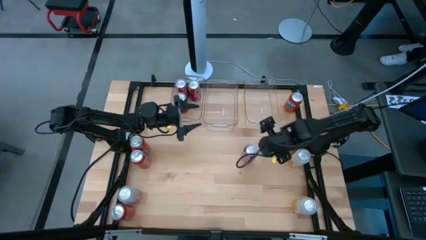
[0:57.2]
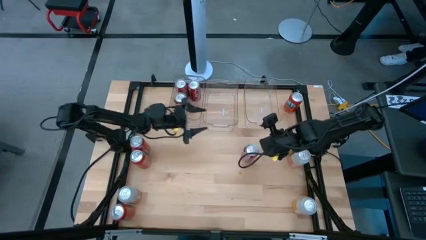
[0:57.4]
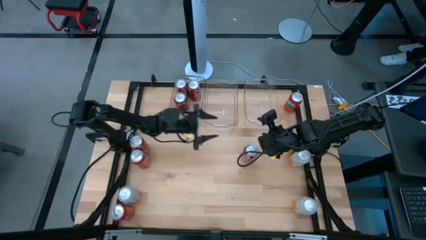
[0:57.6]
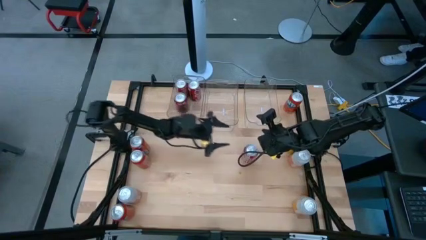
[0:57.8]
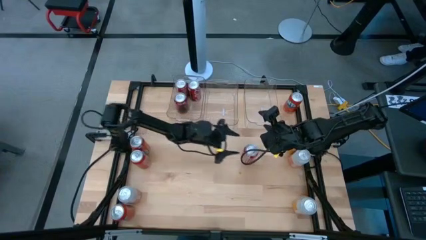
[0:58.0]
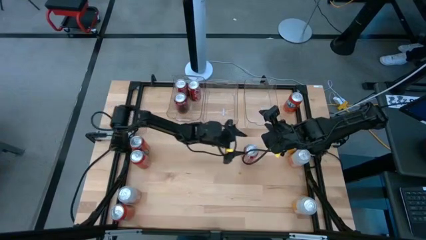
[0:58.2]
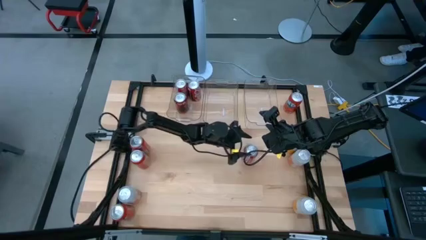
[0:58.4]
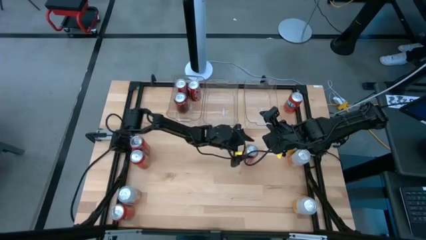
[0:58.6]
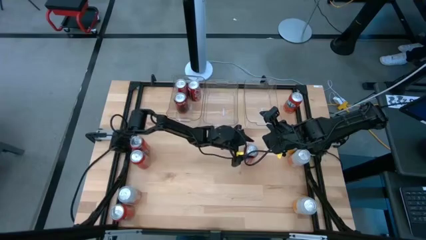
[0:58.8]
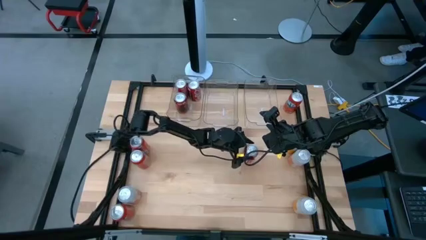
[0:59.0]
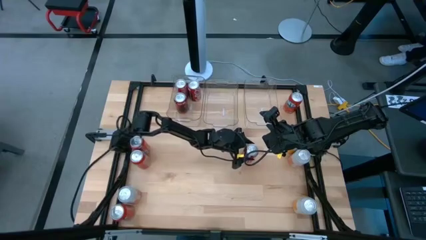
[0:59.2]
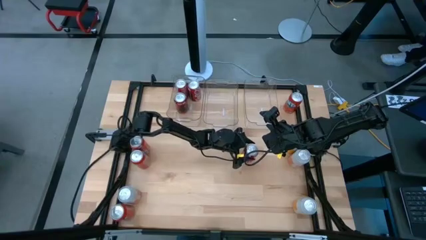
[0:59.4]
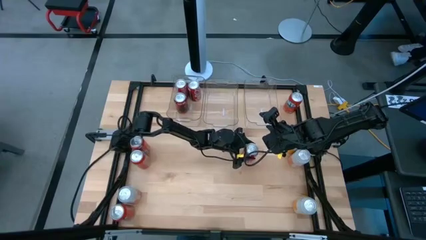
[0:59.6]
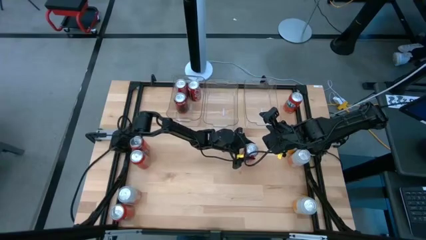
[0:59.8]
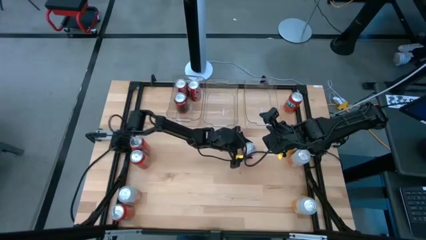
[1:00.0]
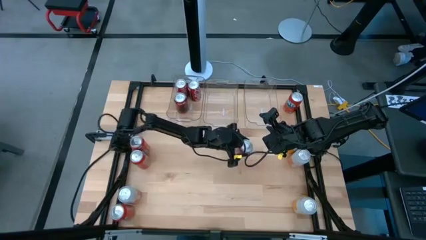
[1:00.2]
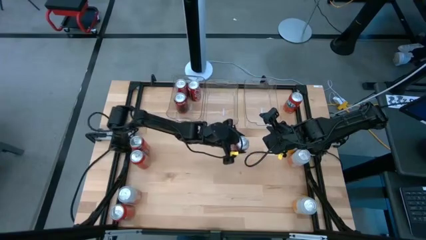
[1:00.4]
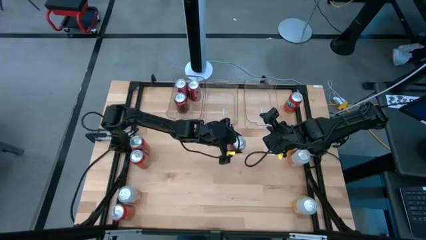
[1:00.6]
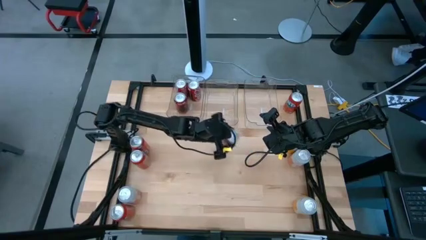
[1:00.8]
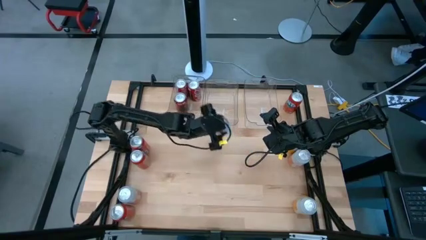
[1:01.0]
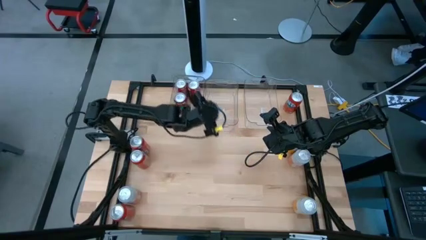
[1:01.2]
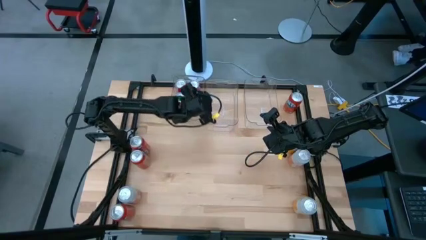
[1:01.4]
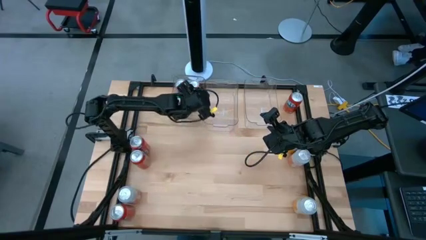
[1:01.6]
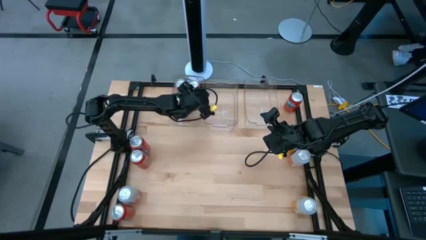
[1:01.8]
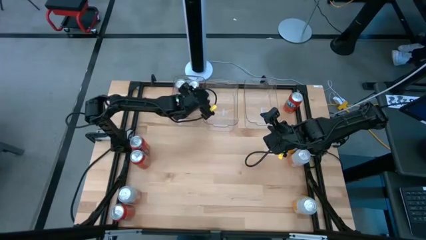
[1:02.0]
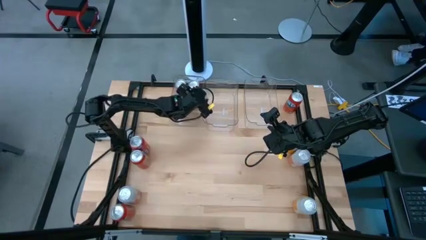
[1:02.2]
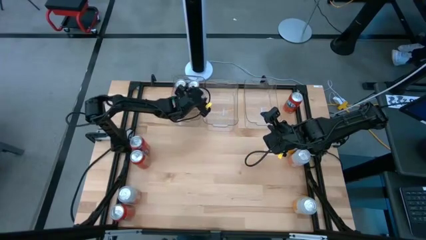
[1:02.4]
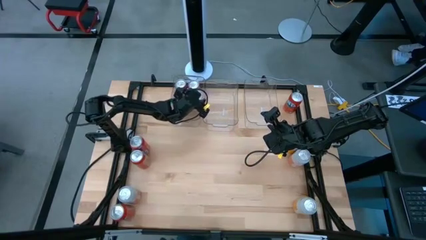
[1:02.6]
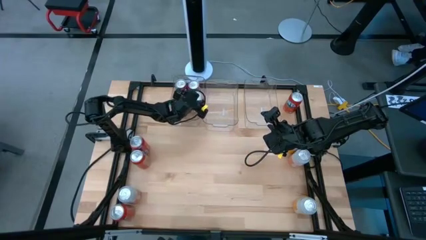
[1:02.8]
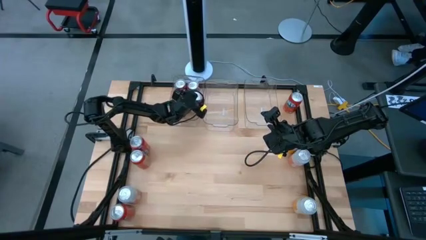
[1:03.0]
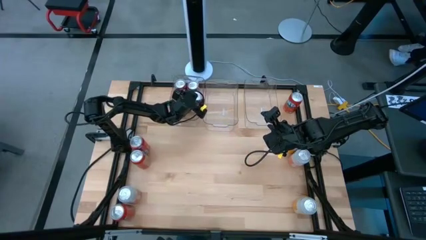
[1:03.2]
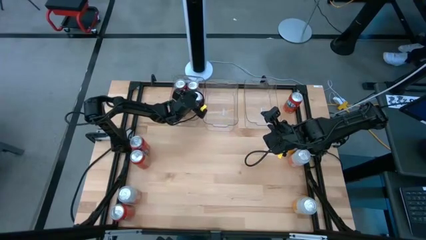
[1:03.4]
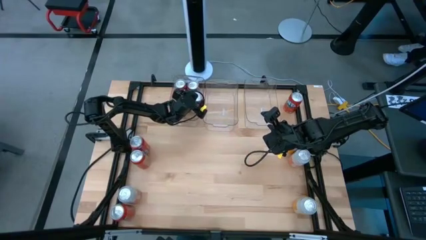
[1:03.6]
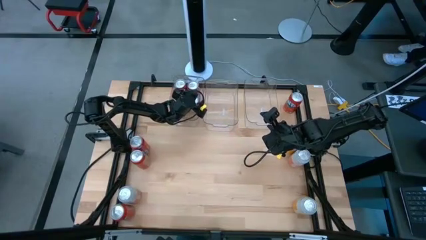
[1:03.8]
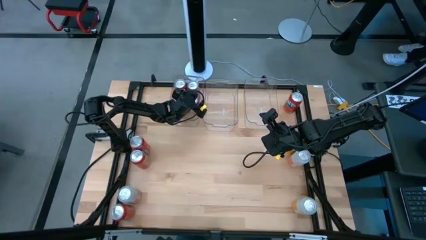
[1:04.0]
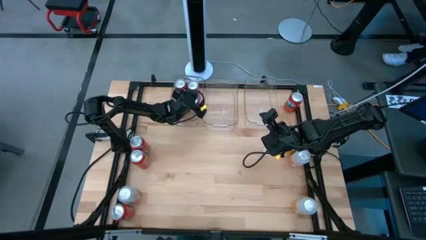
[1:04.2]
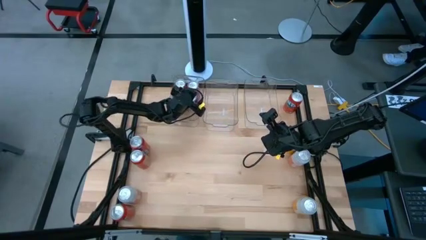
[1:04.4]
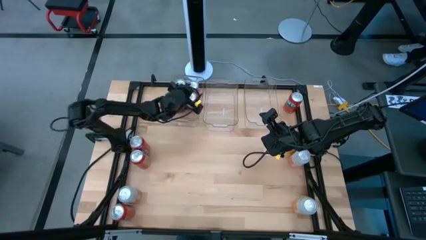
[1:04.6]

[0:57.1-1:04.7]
Task: Sort soda cans
Put the center red soda can into the left transparent bin

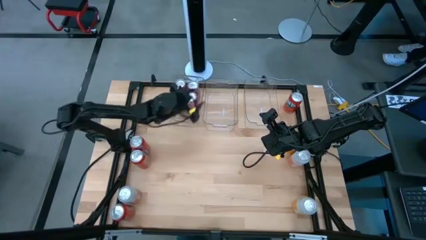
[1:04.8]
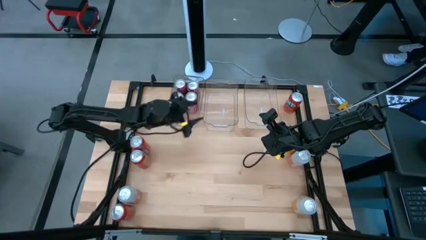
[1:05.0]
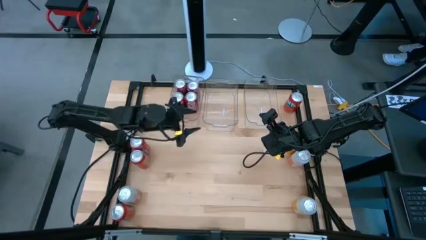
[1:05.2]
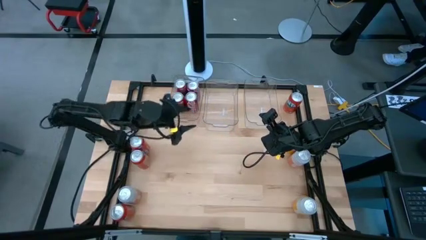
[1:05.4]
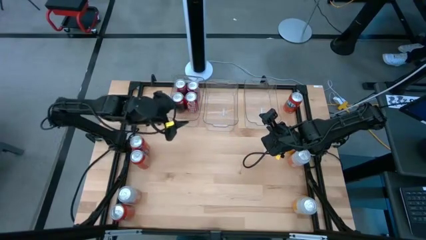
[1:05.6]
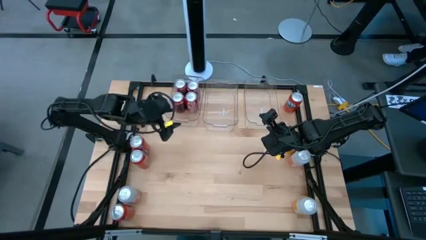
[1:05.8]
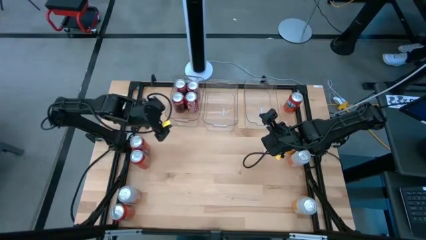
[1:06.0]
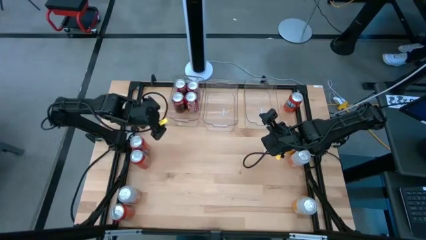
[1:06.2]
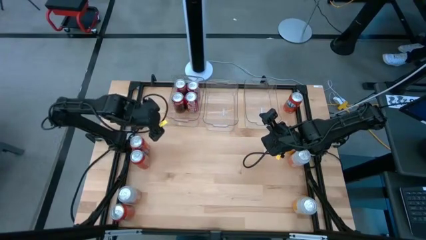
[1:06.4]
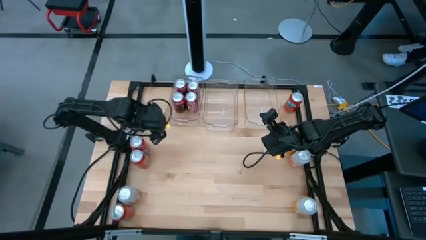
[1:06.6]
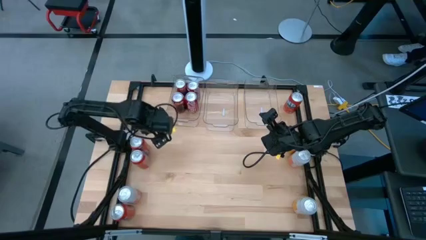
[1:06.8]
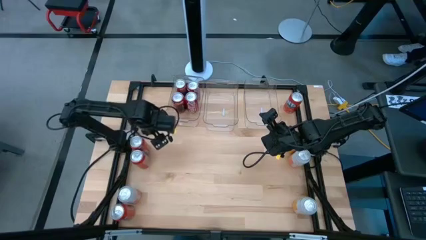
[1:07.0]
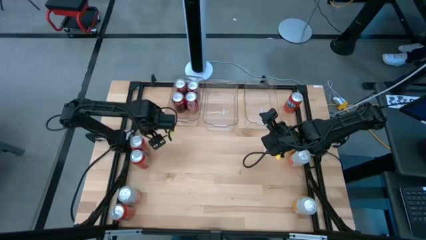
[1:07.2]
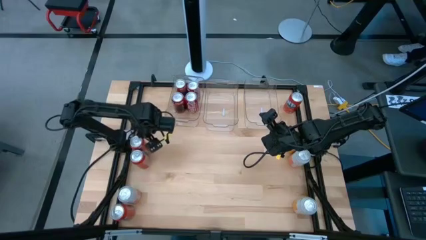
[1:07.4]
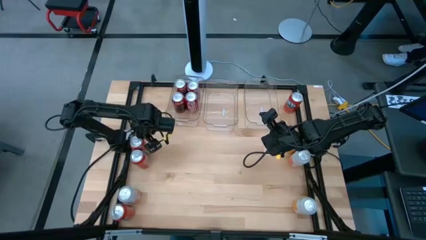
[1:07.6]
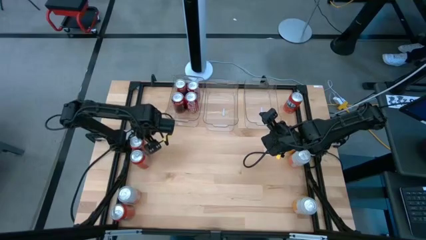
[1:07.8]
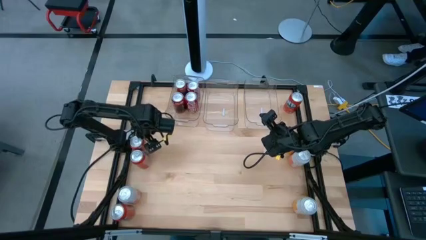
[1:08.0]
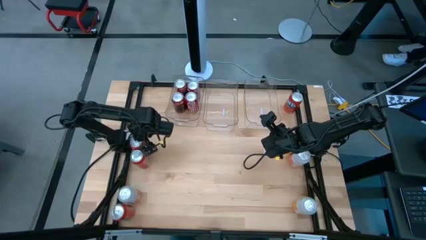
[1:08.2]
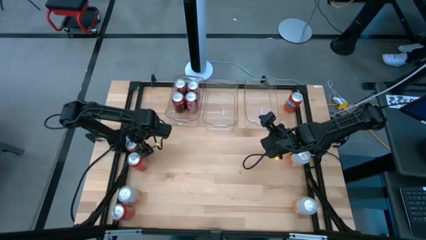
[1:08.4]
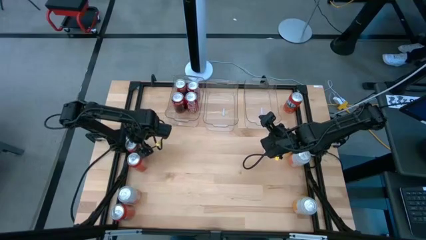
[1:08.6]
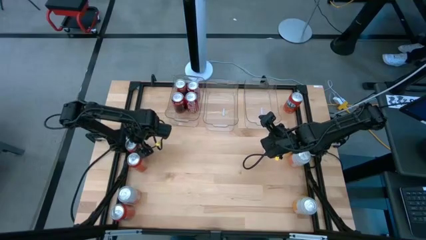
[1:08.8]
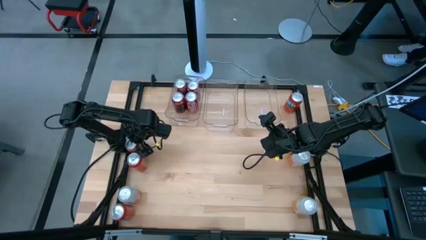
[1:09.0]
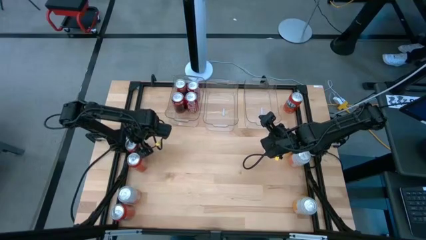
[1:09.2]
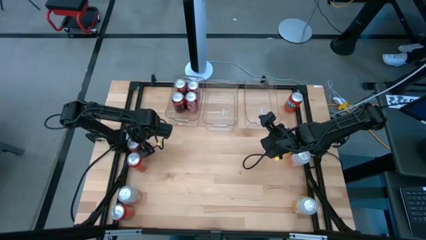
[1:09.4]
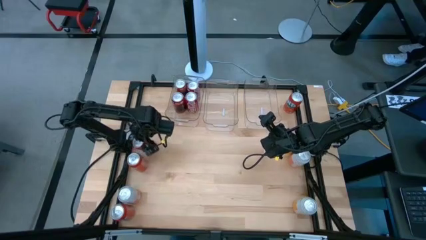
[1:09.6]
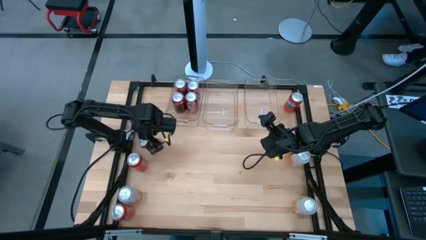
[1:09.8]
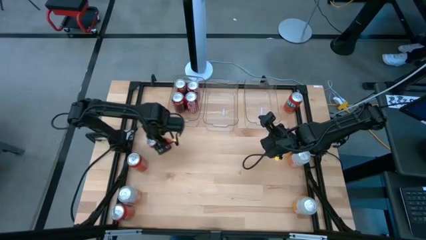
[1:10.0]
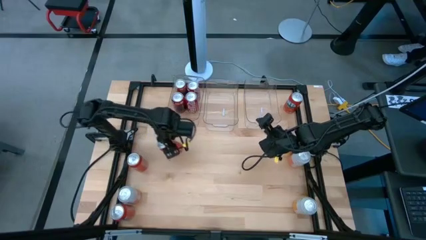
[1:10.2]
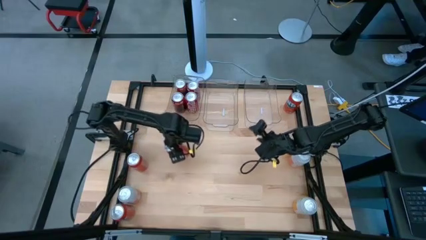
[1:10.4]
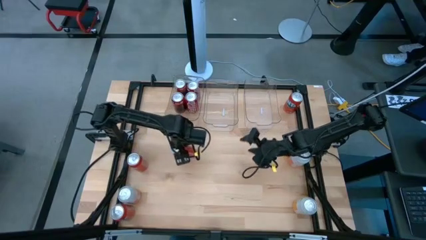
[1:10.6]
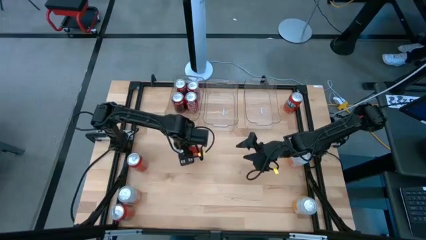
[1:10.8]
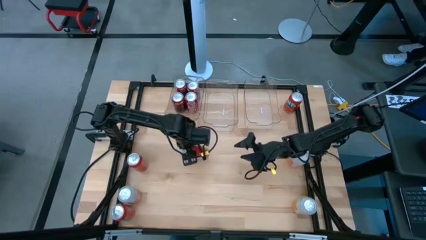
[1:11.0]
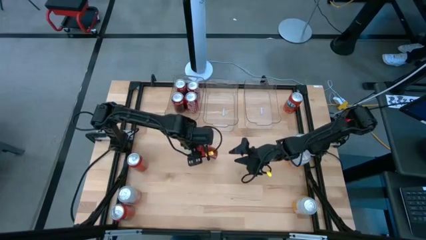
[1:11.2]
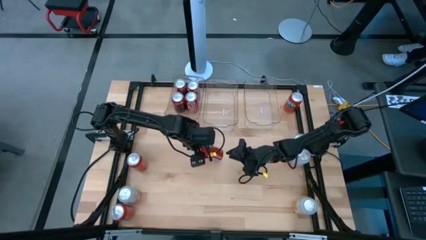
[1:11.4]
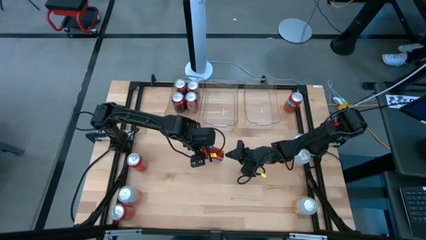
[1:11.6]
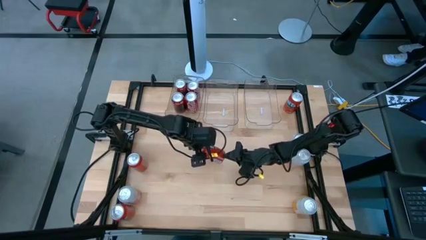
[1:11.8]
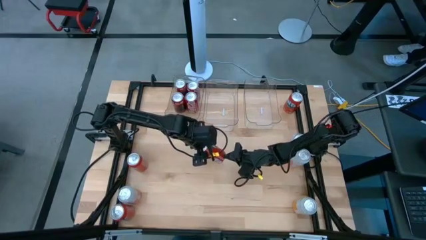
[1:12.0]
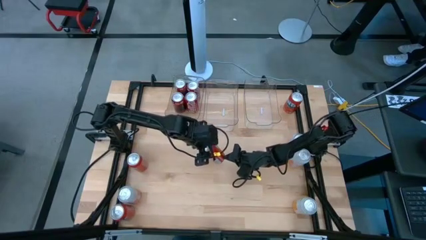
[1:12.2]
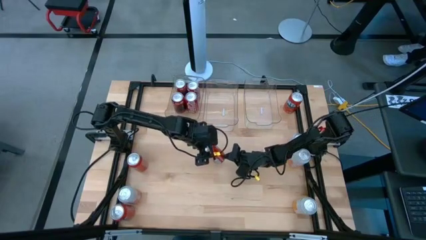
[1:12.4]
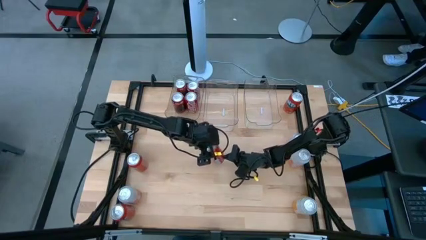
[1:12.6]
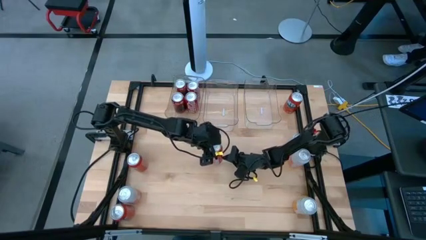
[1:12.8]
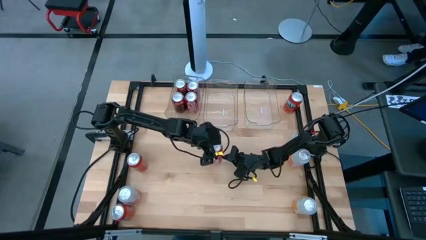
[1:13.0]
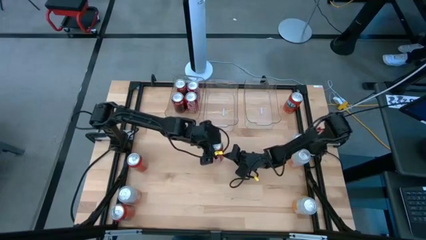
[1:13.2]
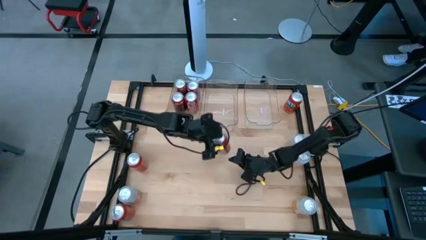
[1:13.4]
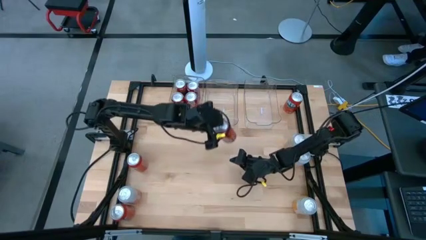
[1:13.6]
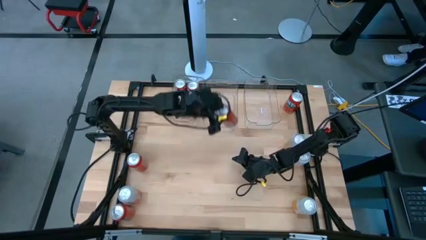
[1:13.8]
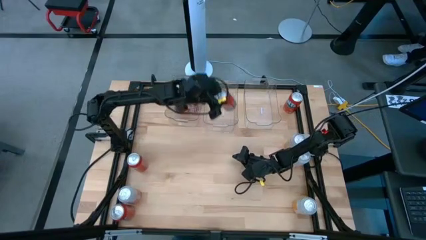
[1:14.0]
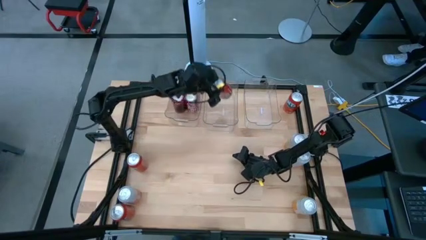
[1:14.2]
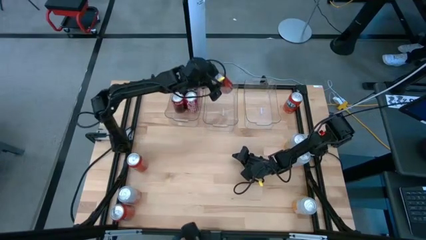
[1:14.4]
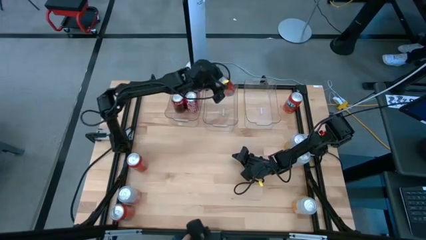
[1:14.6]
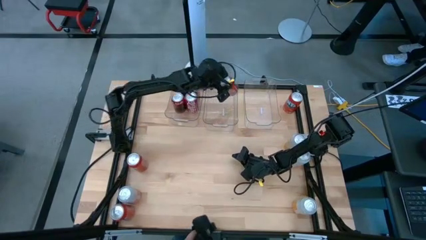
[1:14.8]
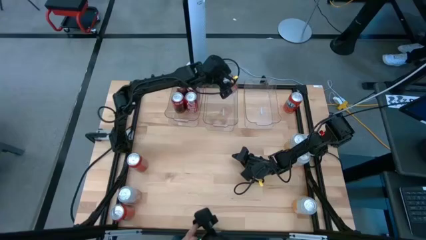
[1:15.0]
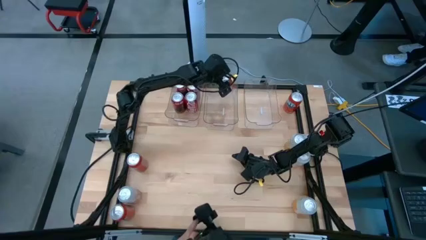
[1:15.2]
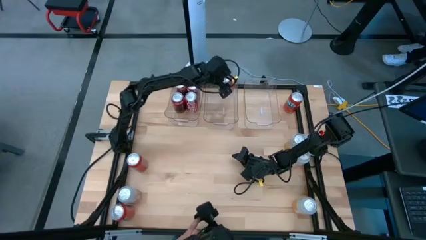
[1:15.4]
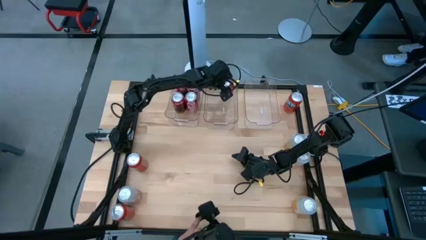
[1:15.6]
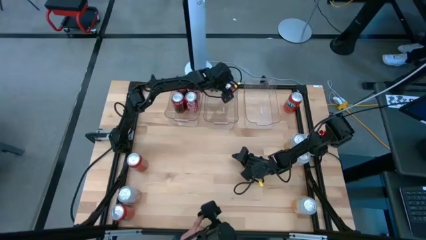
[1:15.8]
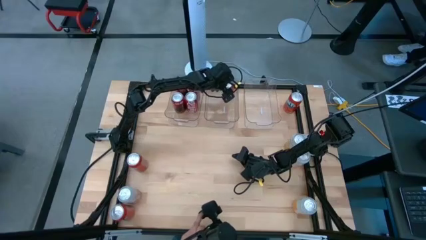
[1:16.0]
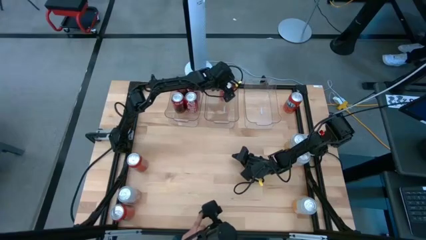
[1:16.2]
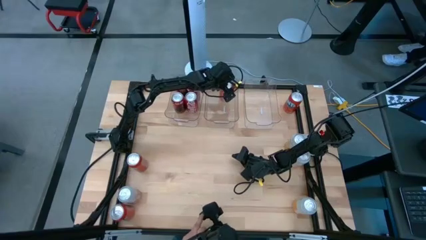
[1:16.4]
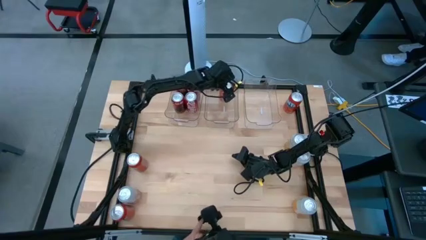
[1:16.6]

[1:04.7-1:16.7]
Put the top left middle orange soda can into the middle transparent bin
